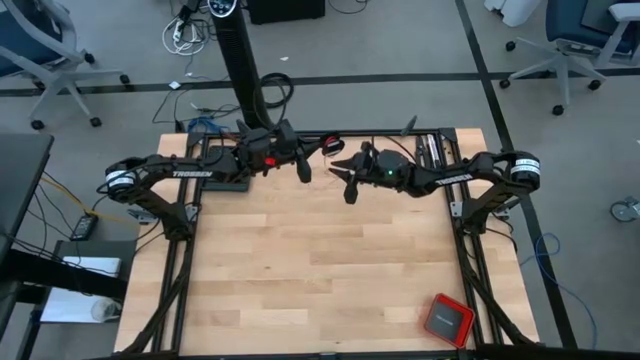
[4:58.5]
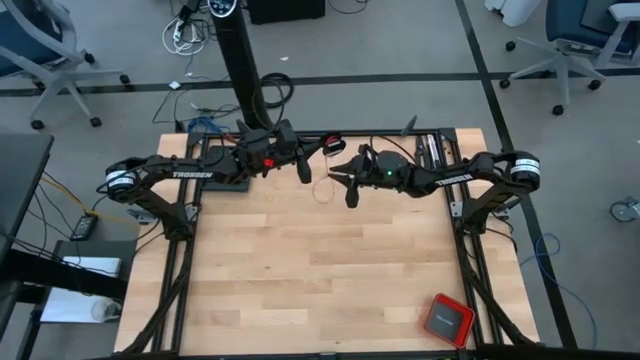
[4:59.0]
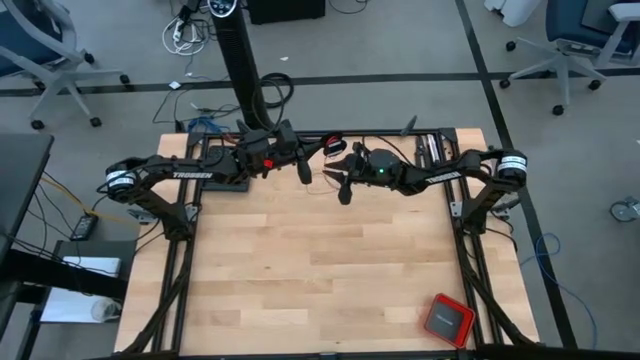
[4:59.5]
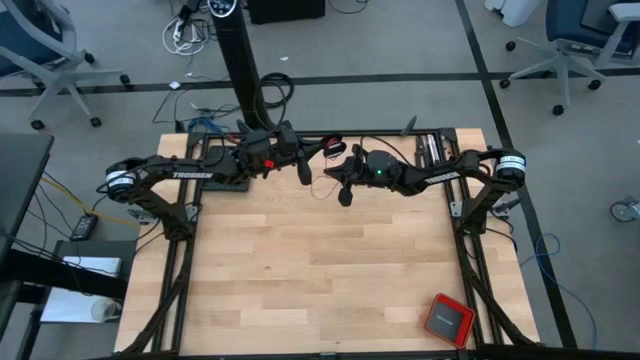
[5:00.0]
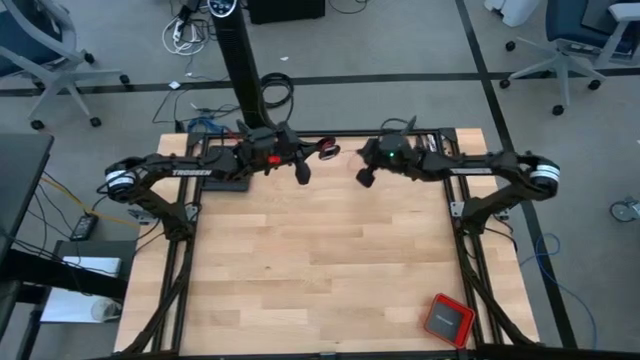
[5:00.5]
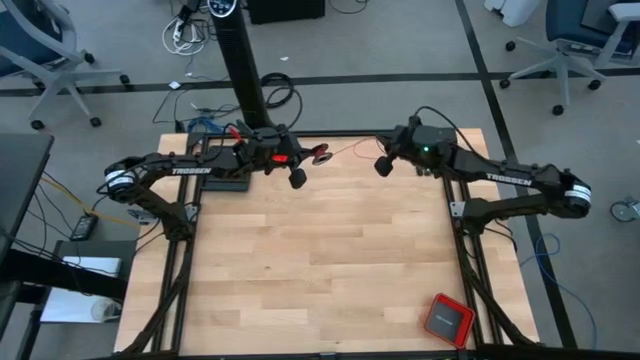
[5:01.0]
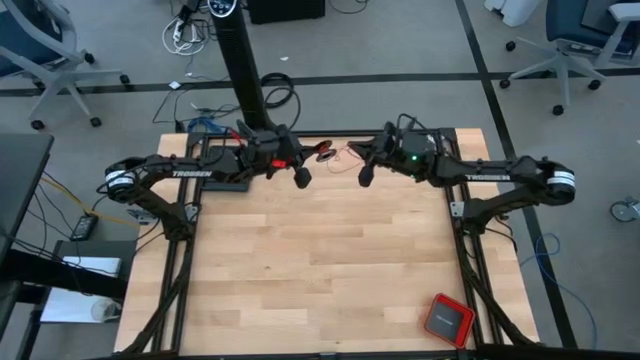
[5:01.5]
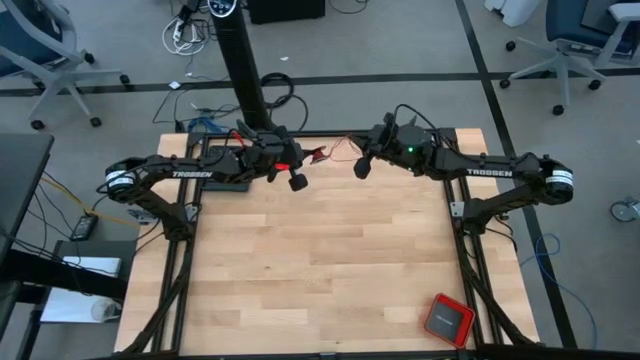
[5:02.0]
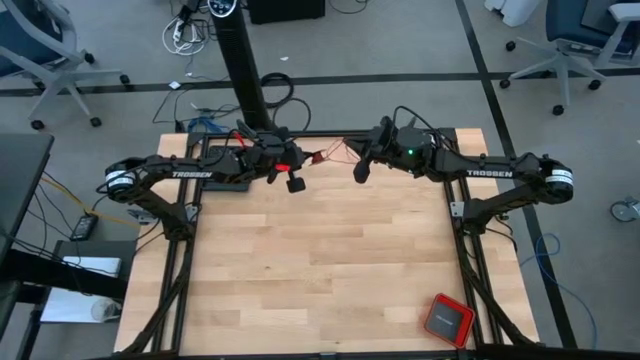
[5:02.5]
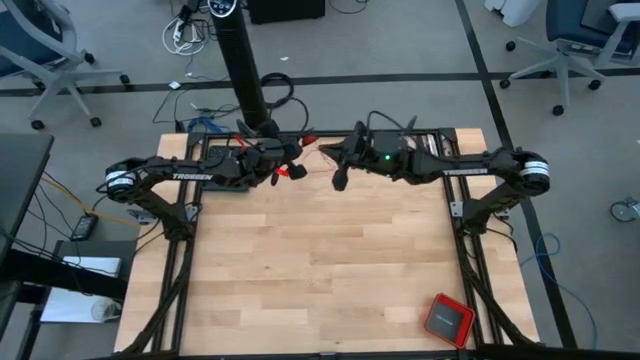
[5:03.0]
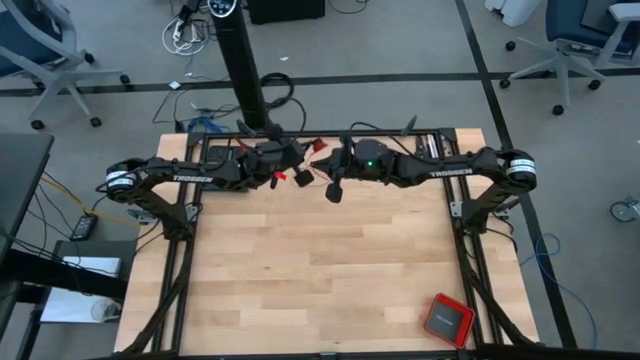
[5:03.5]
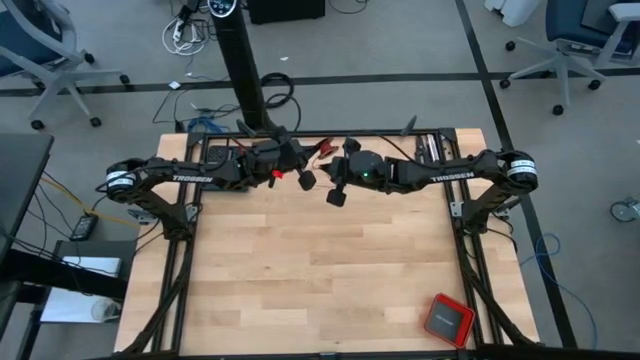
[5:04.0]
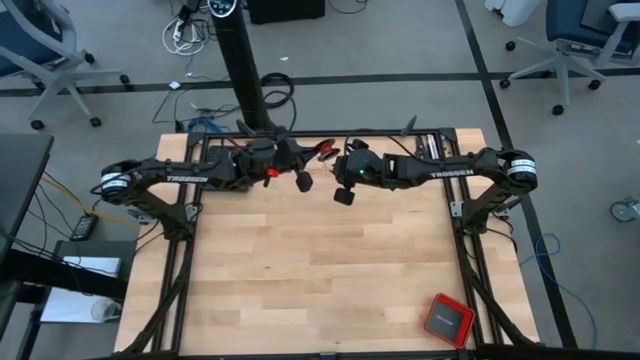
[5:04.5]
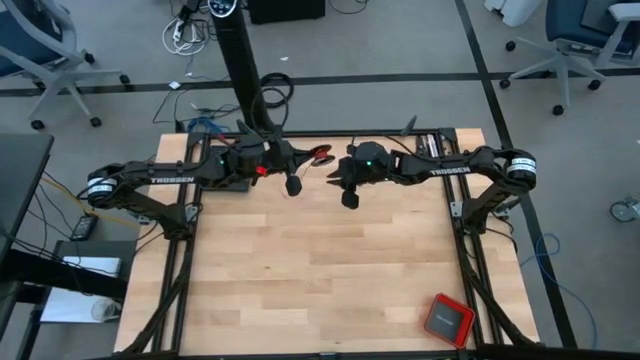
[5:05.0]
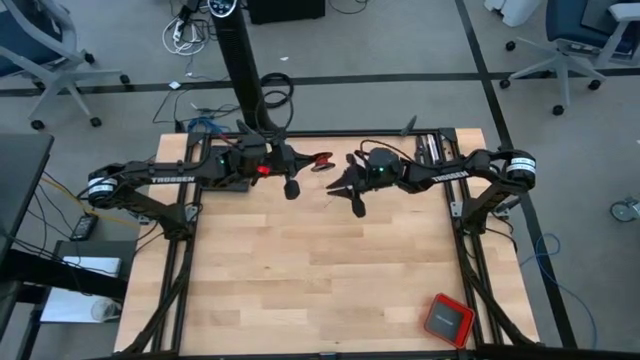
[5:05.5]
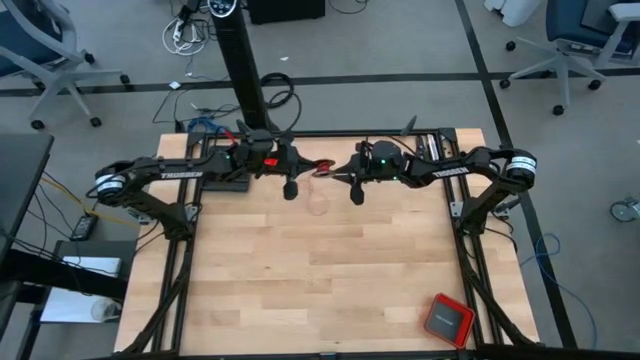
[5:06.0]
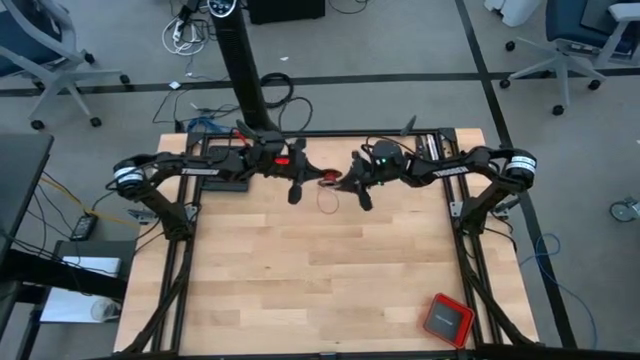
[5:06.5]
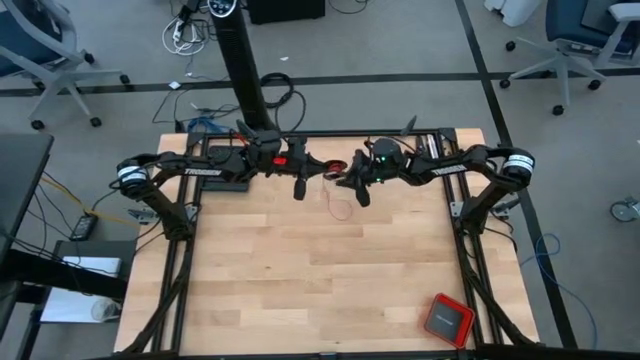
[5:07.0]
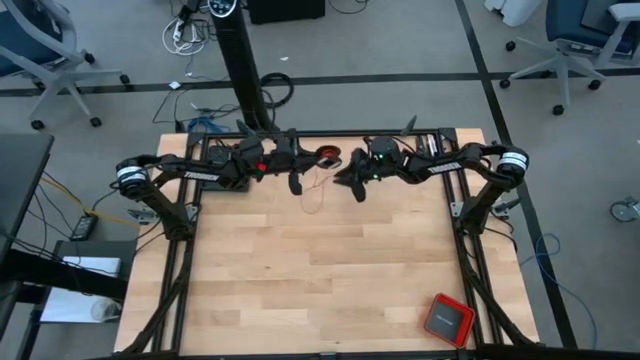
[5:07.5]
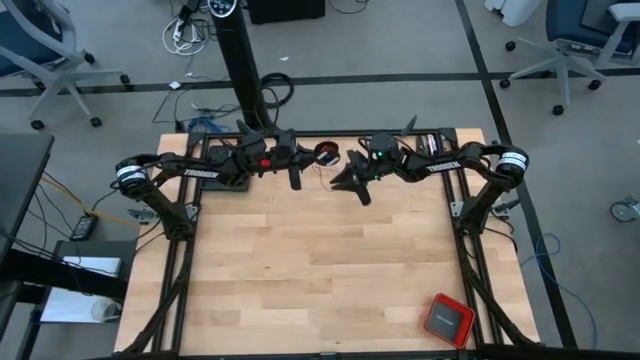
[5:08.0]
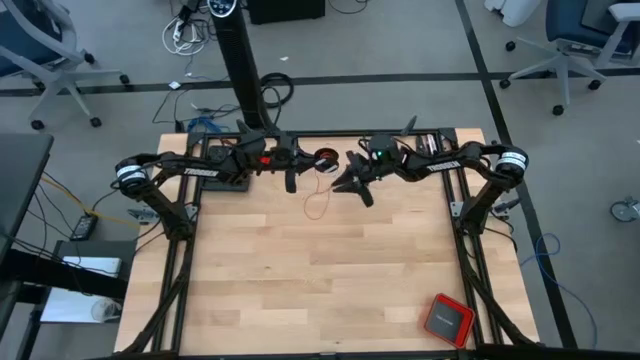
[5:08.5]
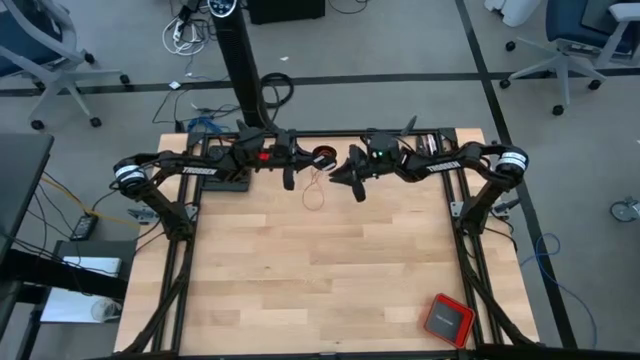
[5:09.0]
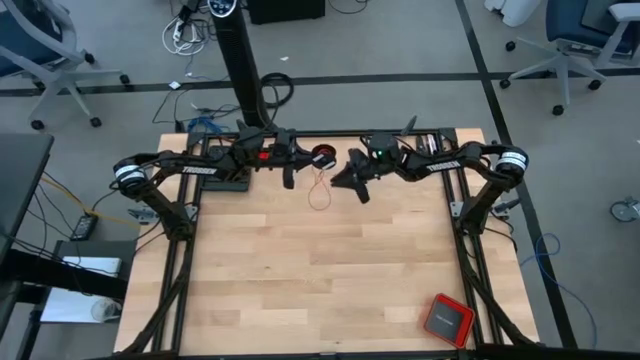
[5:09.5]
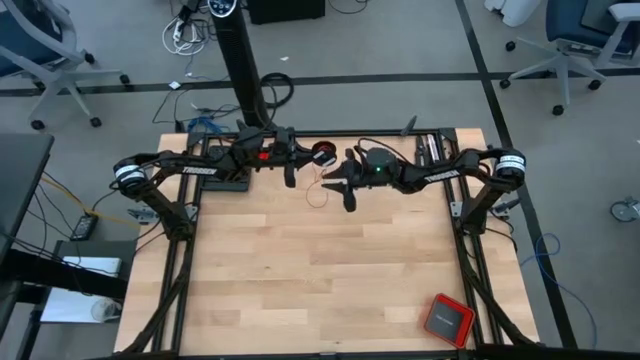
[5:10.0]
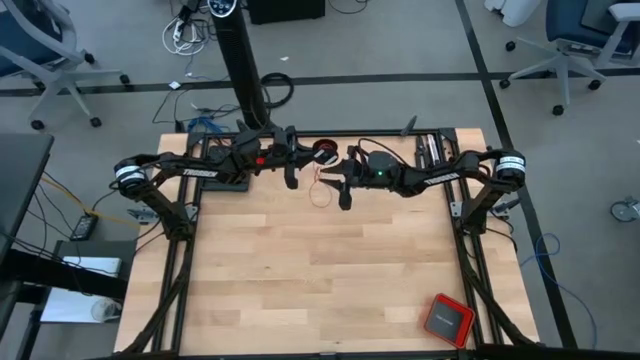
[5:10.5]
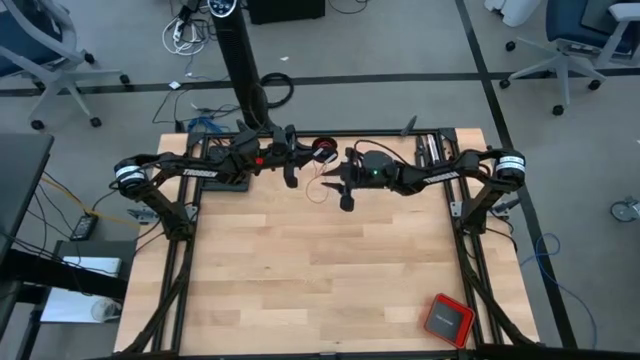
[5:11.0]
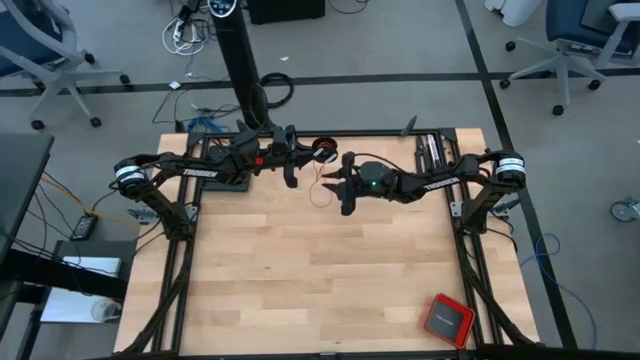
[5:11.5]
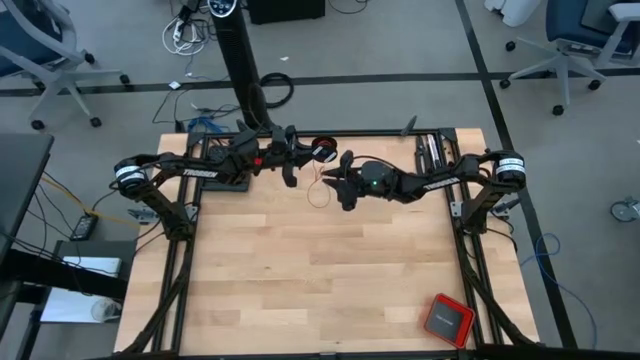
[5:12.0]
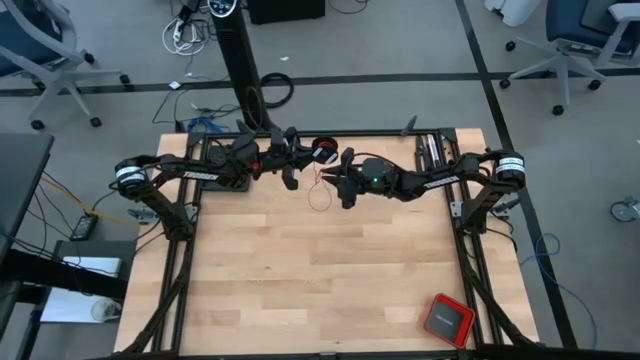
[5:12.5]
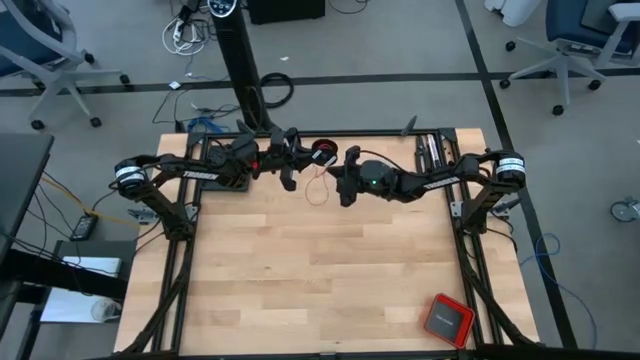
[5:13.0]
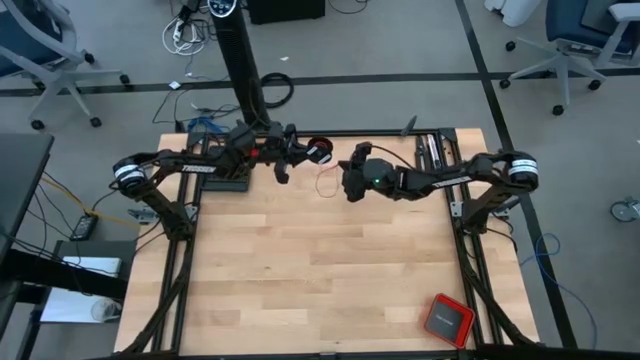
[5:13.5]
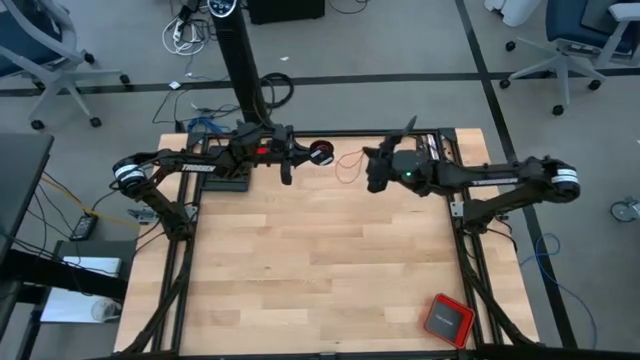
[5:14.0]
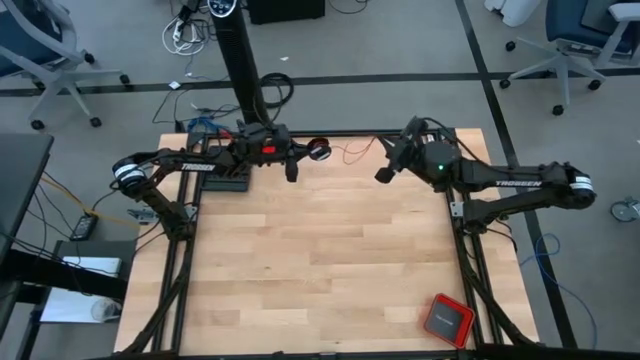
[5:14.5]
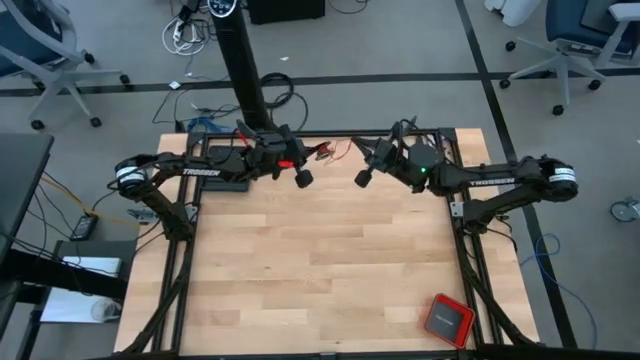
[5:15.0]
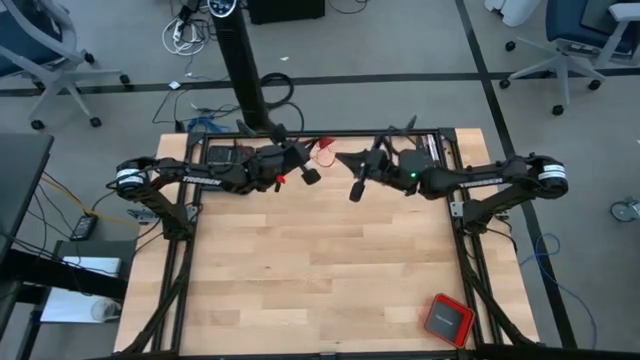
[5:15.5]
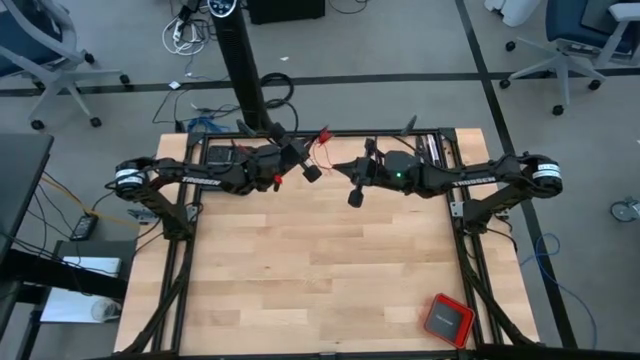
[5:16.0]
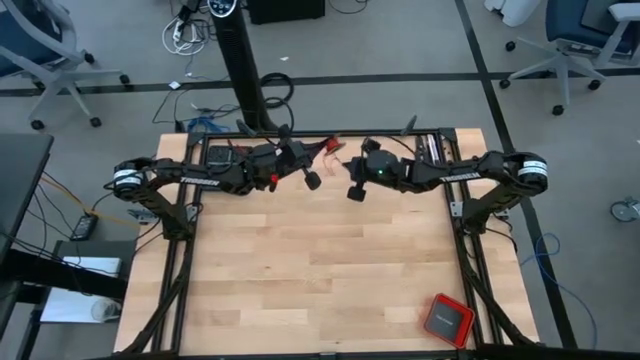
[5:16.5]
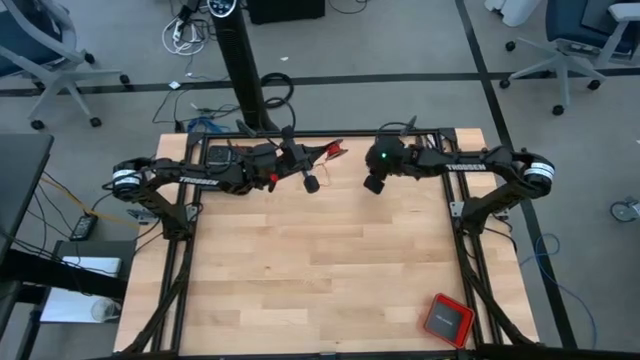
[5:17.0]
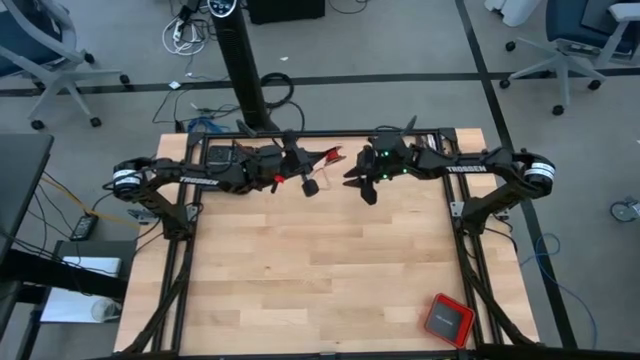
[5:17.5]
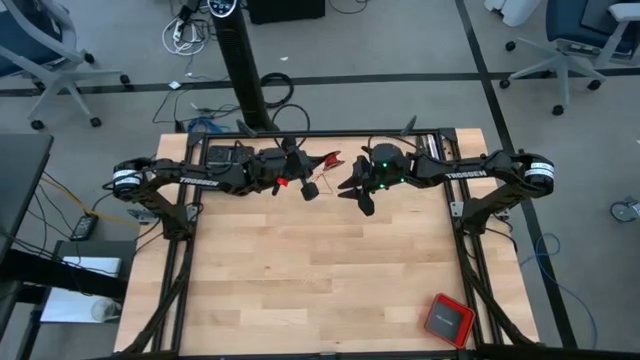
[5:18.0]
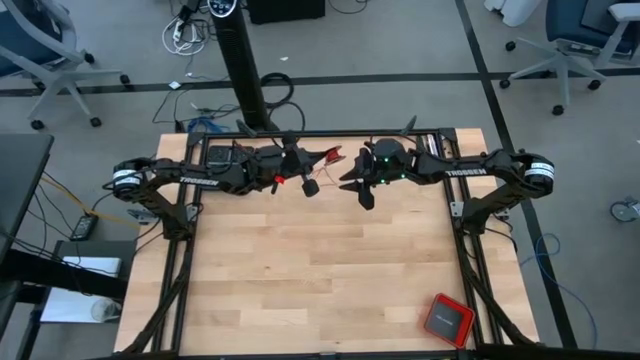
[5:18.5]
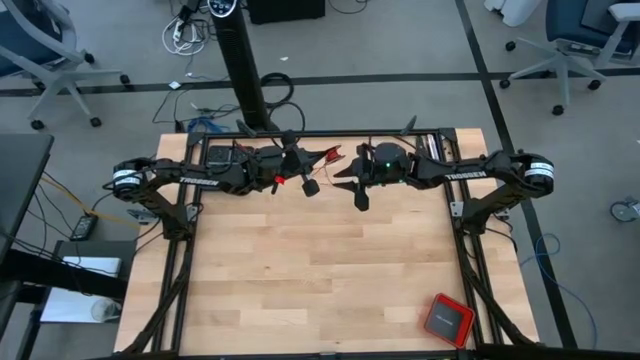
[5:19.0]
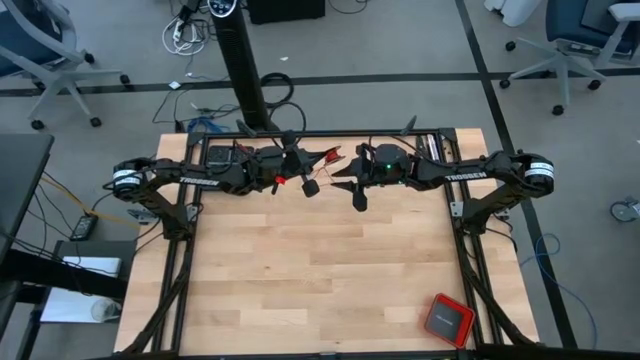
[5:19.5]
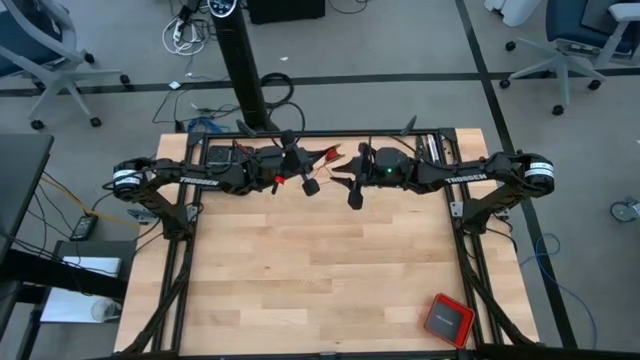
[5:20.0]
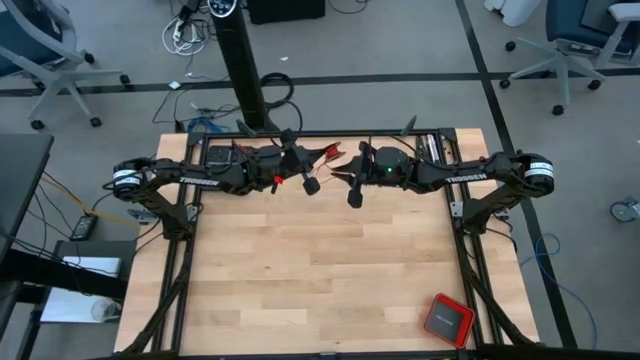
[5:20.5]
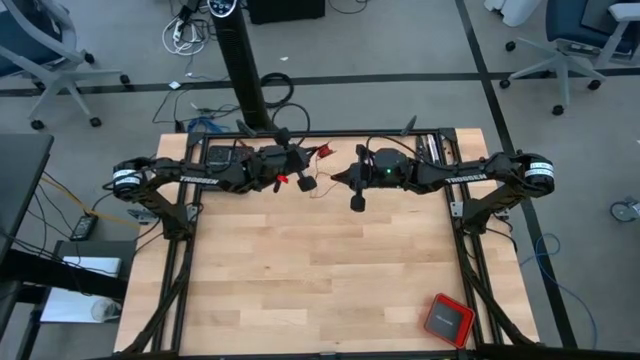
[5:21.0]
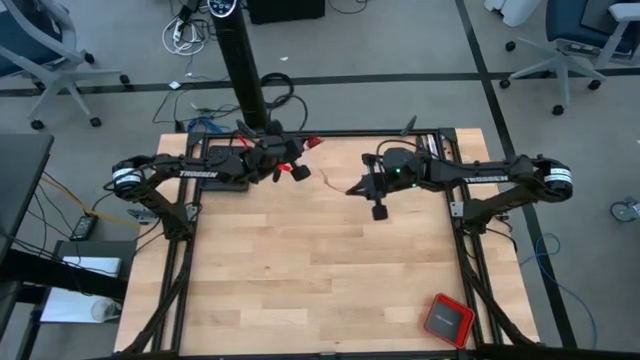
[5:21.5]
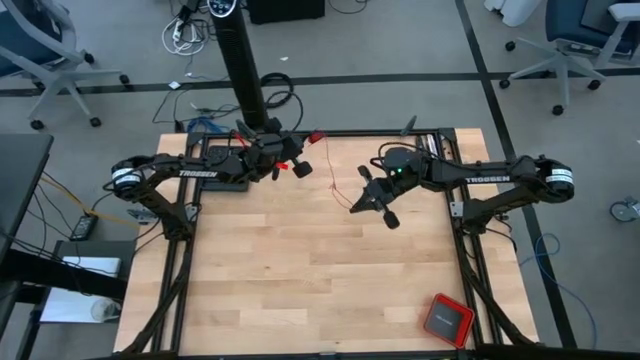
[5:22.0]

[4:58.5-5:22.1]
Task: Coil cords
Coil the red wire onto the spool
